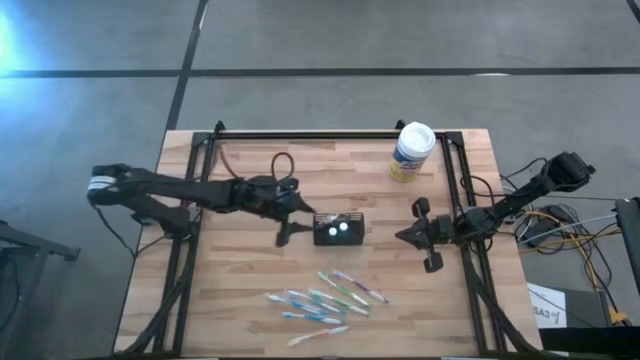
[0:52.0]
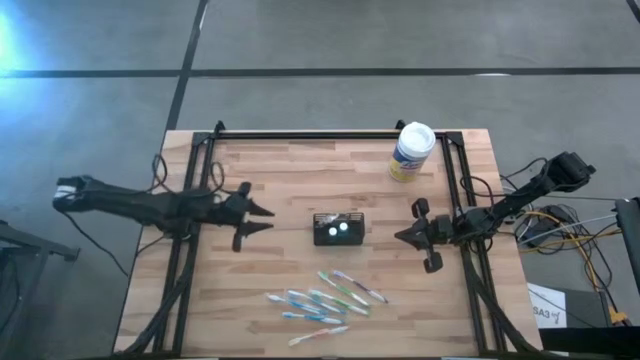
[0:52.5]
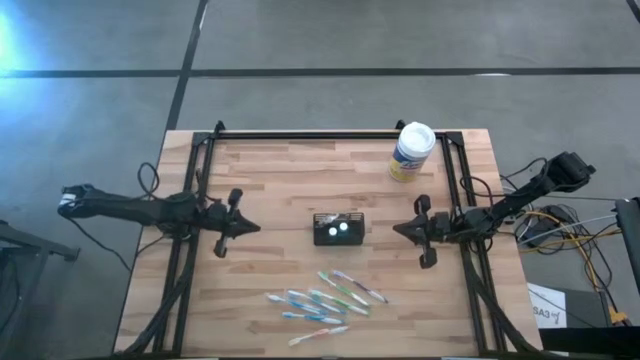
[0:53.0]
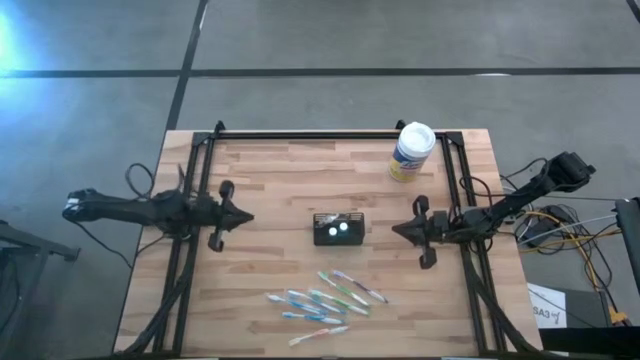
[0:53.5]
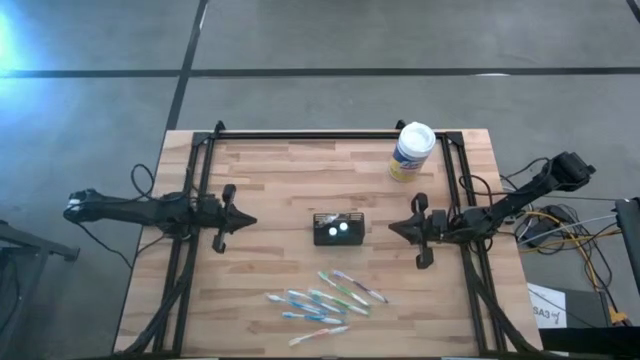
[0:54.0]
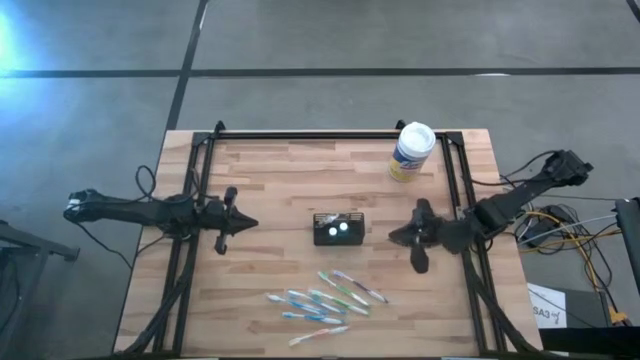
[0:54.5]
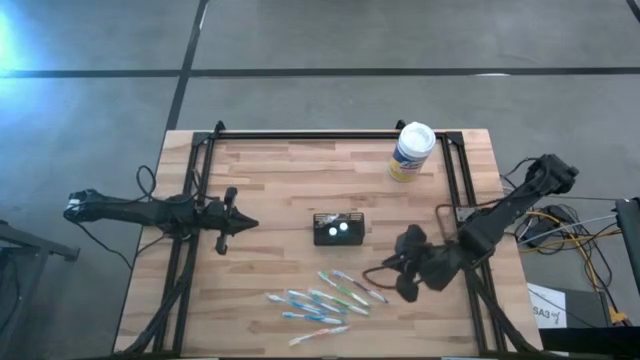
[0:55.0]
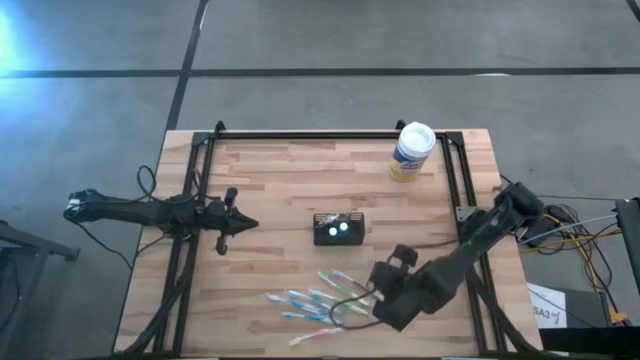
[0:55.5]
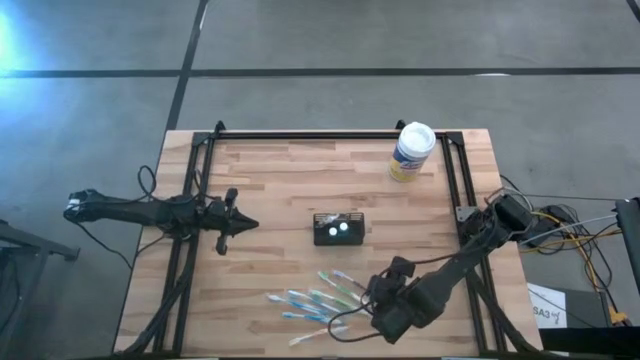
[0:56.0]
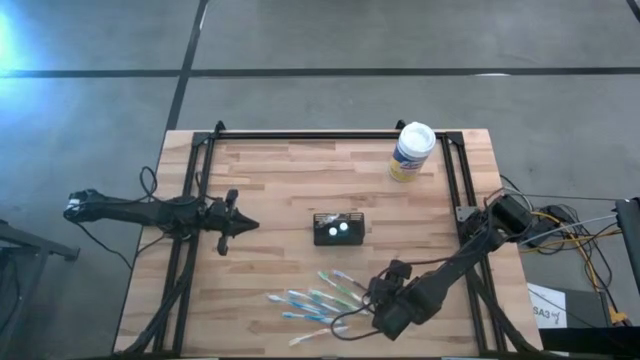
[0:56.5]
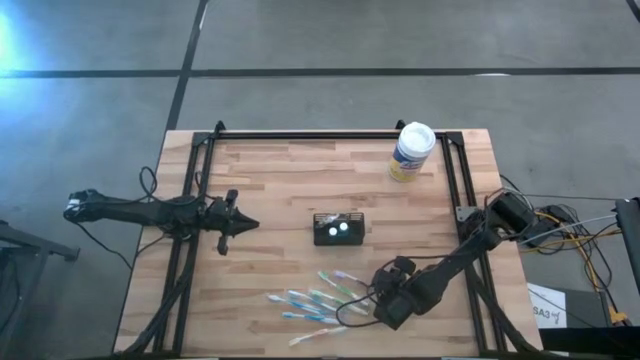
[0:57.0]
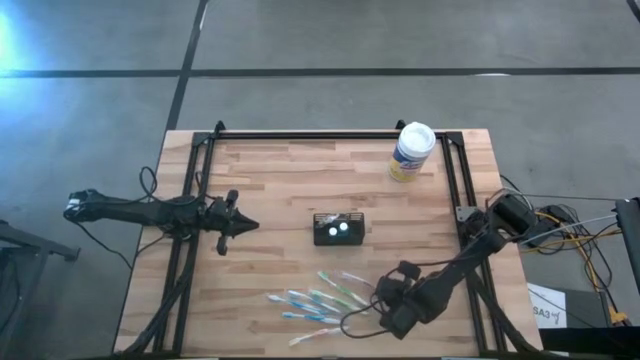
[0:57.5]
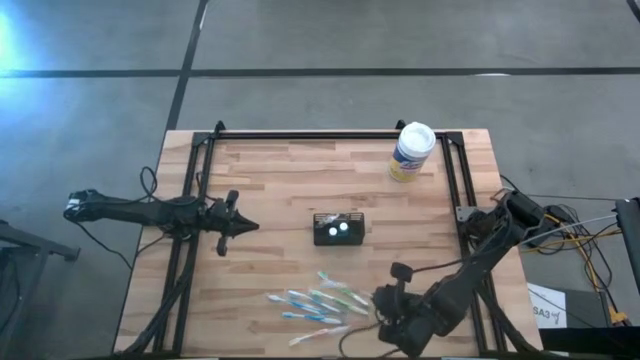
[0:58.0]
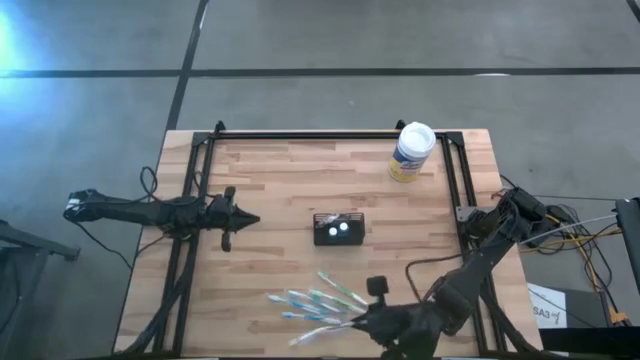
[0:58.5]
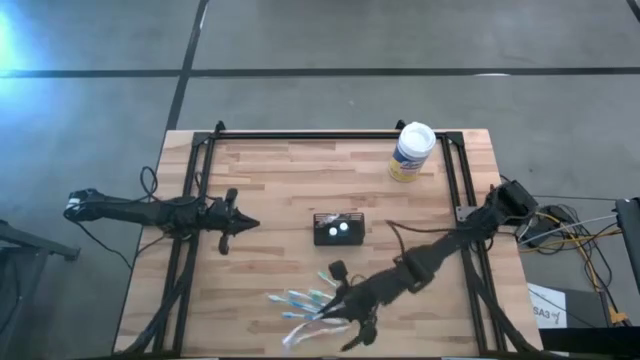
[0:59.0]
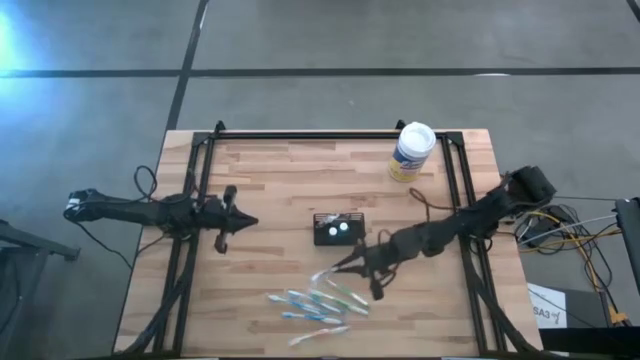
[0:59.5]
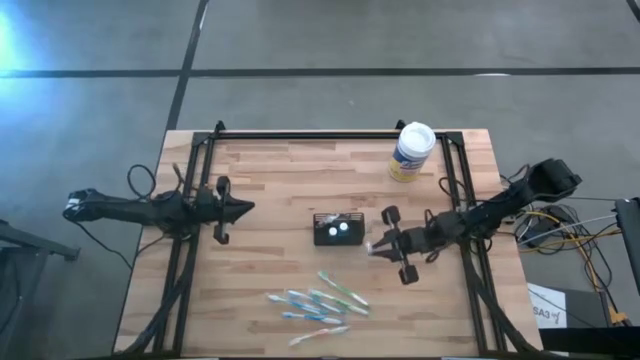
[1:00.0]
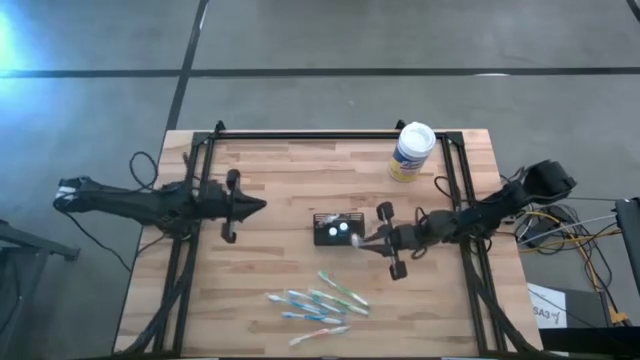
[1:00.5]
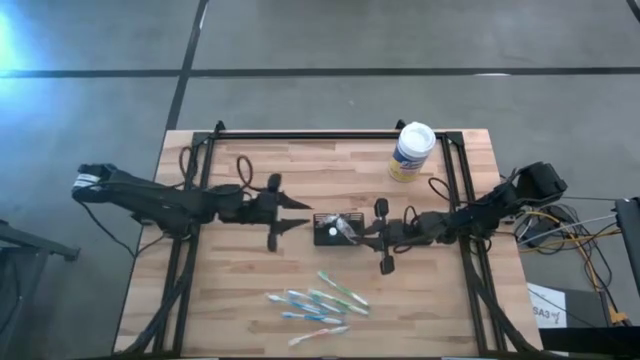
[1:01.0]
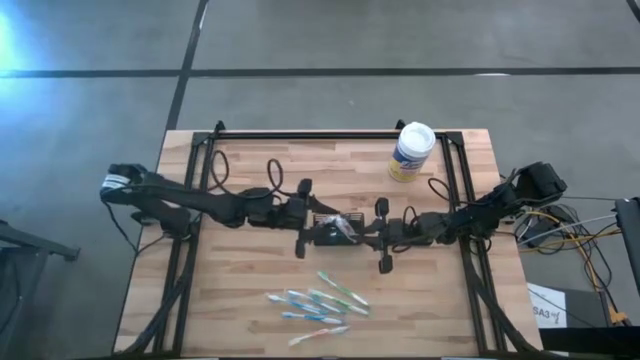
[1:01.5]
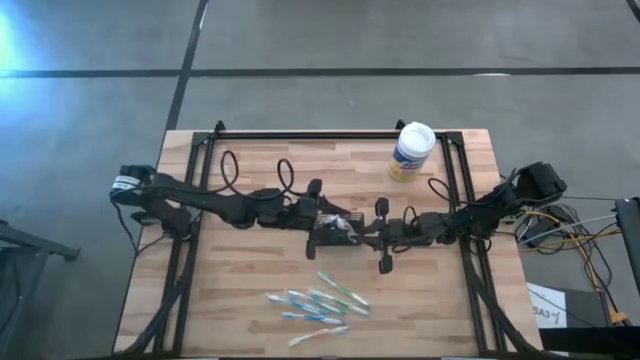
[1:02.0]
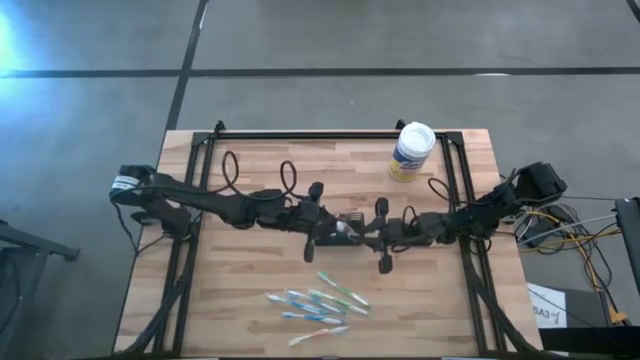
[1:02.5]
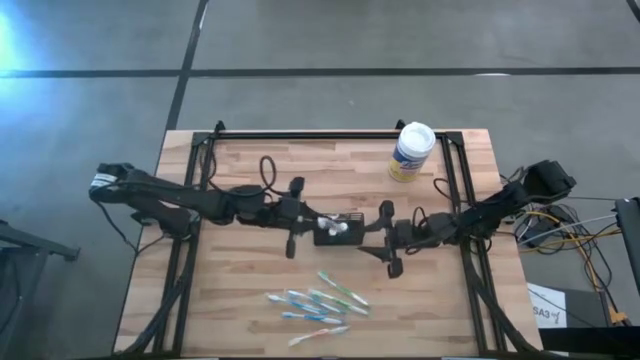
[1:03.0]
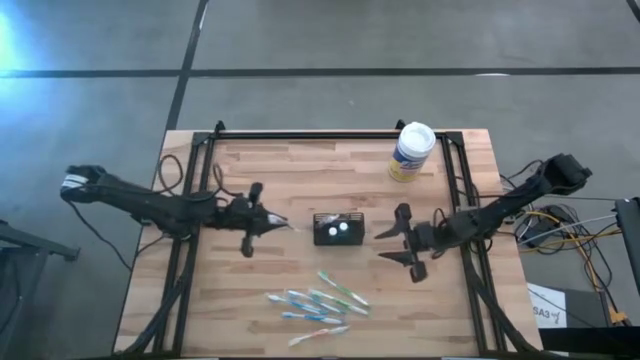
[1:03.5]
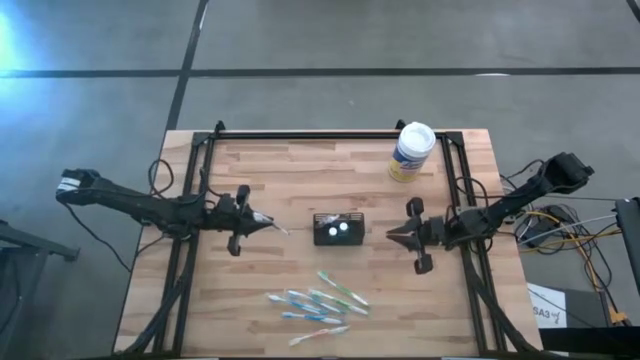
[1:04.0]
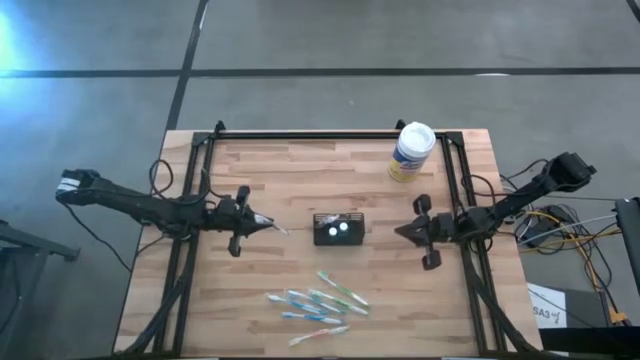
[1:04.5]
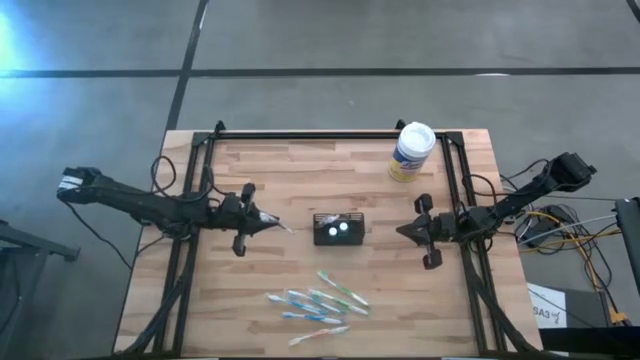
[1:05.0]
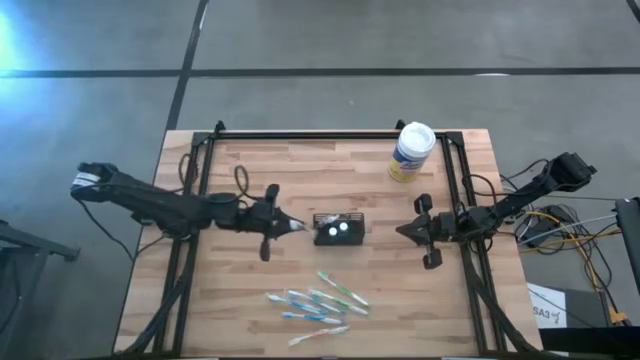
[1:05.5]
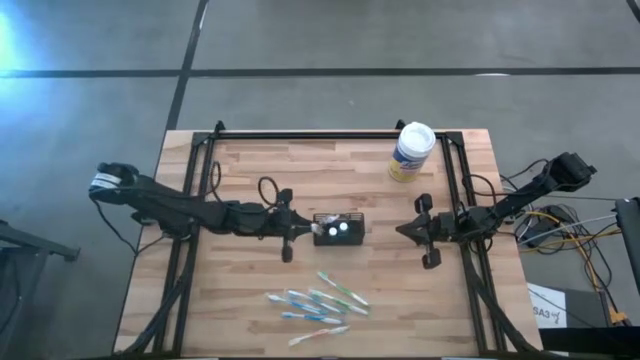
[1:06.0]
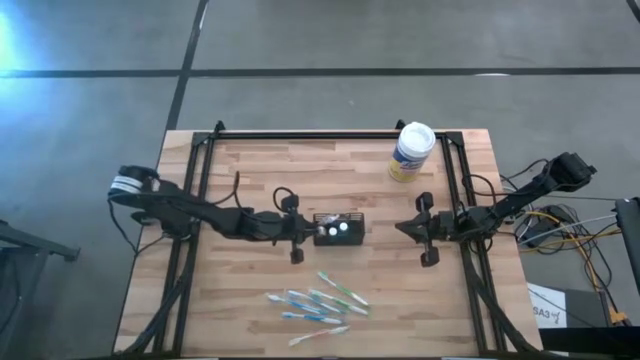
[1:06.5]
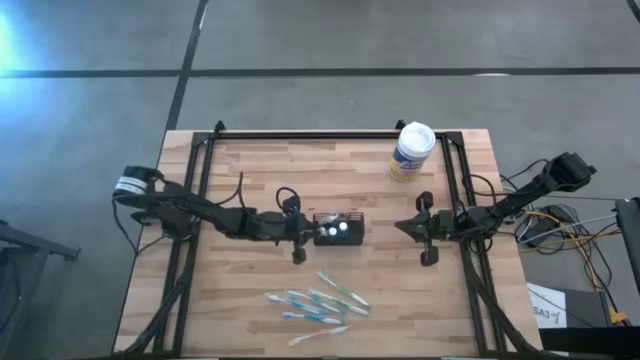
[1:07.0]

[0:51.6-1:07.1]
Task: Pick & Place toothbrushing station
Put the violet toothbrush into the mesh organizer

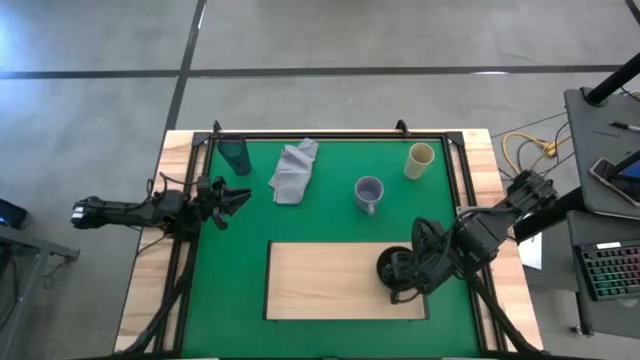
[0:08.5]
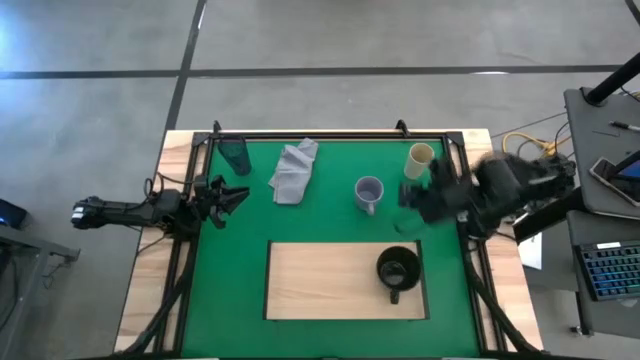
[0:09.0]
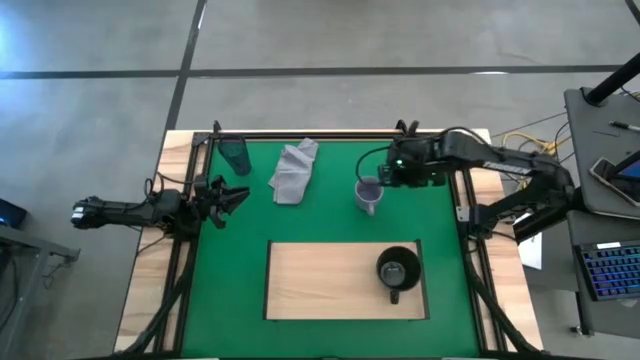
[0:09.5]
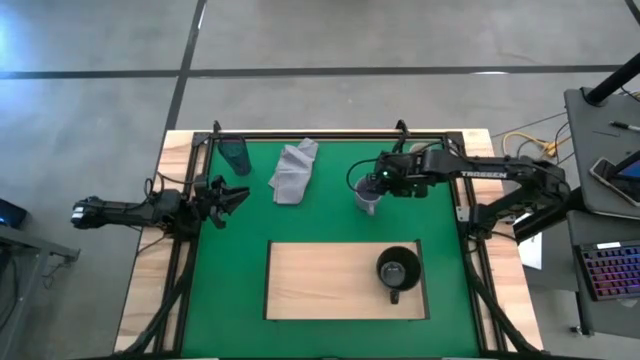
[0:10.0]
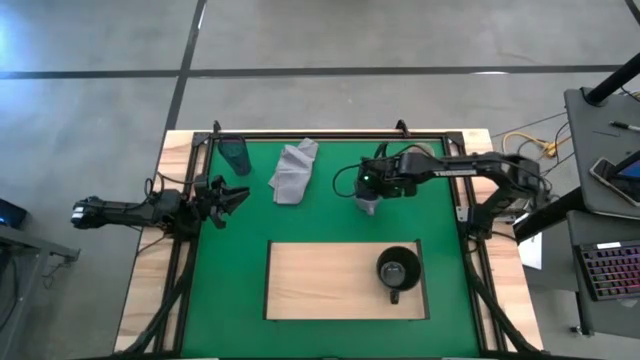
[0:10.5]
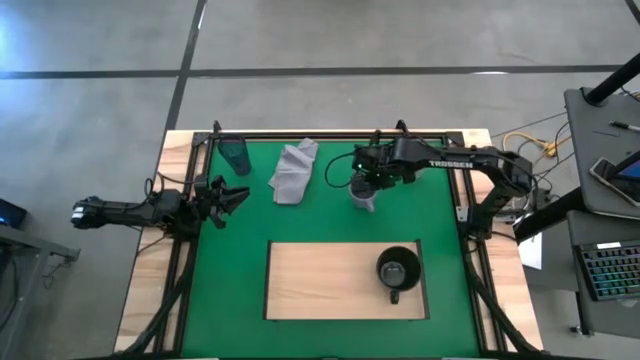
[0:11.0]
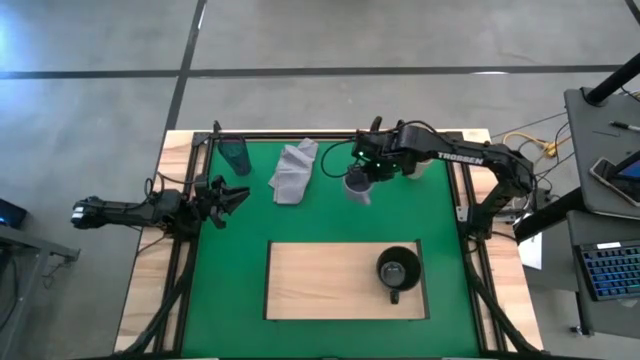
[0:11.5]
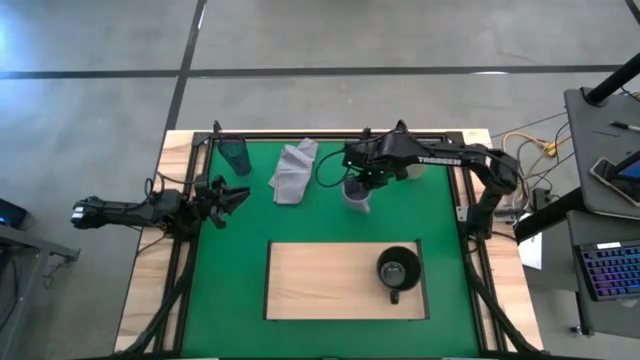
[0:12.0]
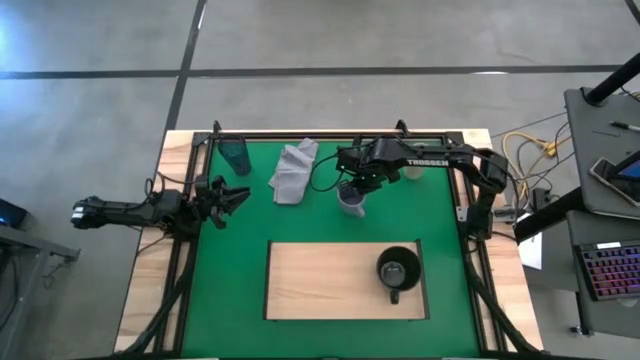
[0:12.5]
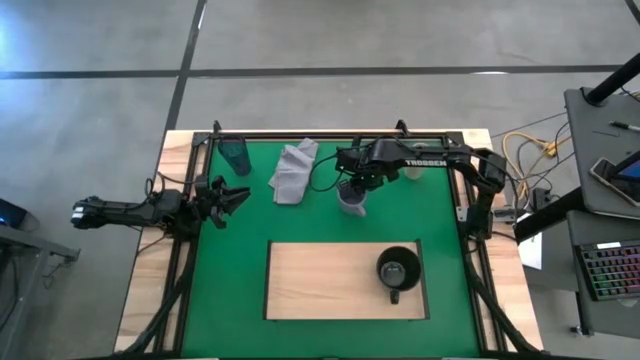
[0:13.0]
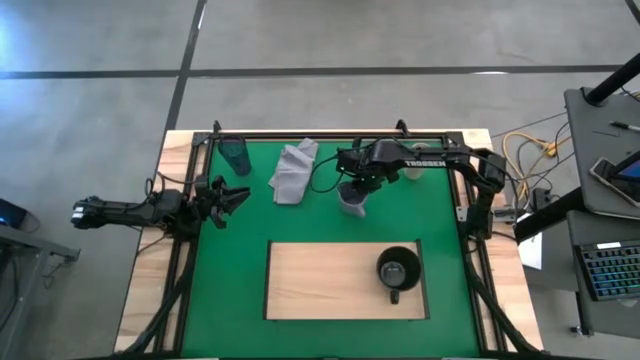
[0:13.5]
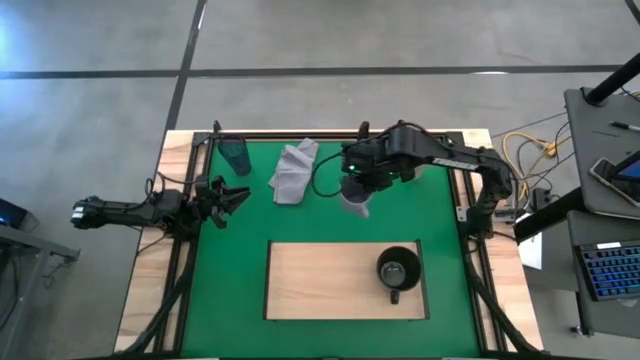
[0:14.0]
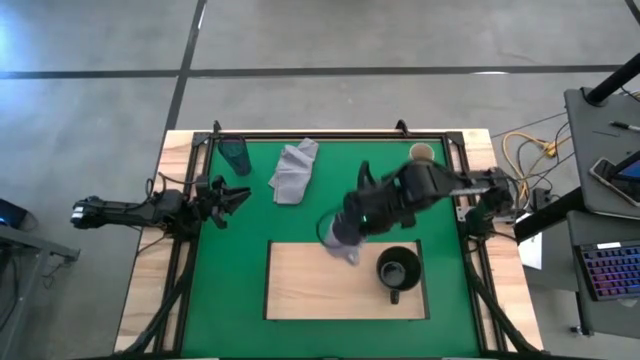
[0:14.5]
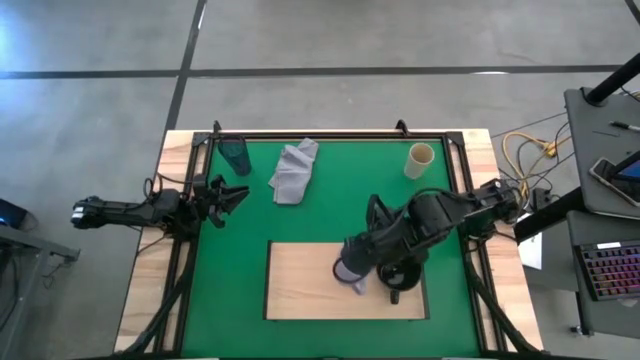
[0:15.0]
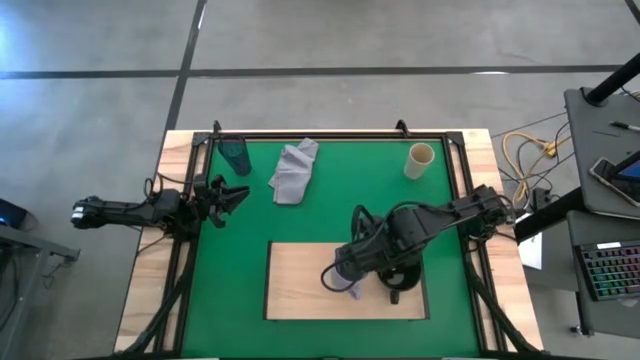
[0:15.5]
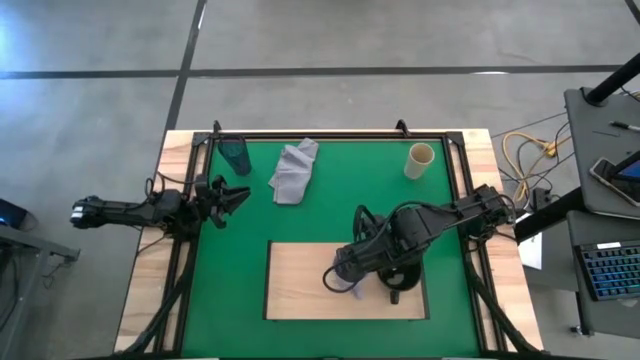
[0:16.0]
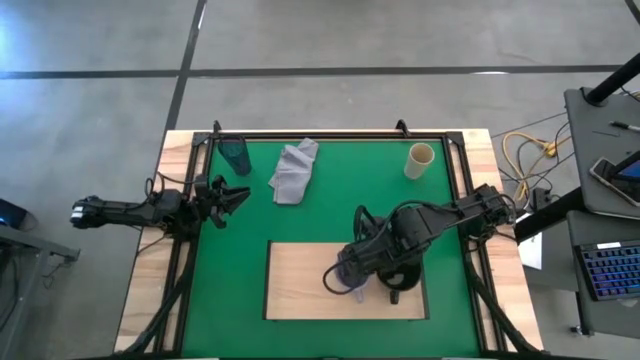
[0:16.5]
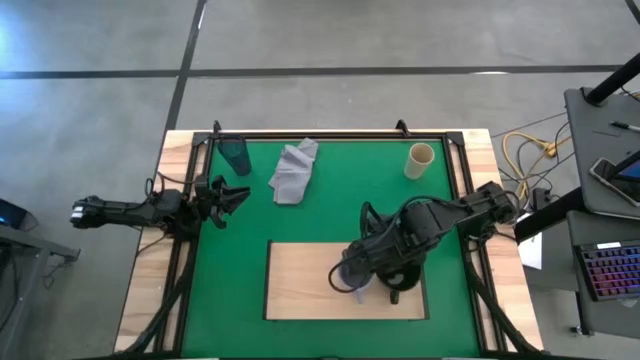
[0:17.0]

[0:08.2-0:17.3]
Task: Stack small to large cups/mugs on shelf
Put the violet mug on the shelf
